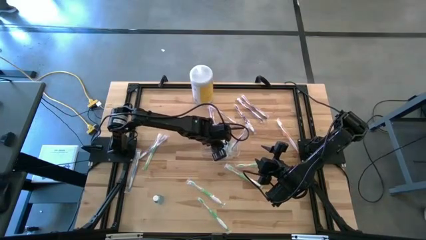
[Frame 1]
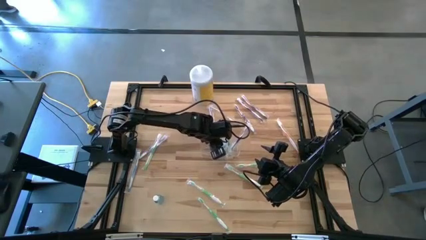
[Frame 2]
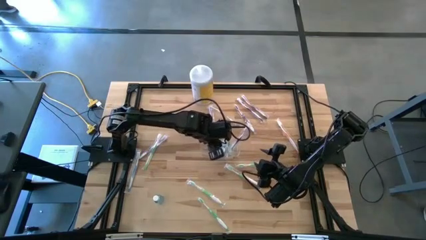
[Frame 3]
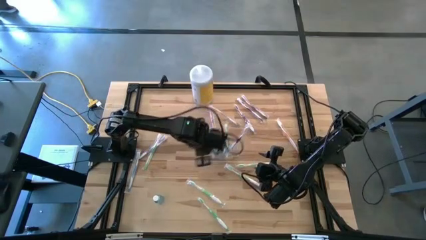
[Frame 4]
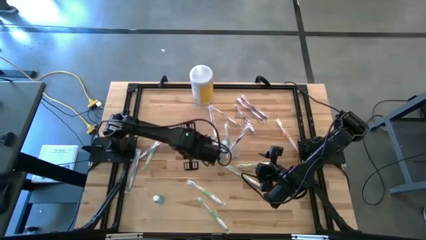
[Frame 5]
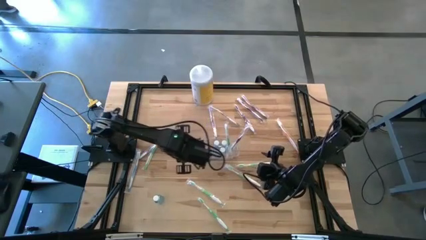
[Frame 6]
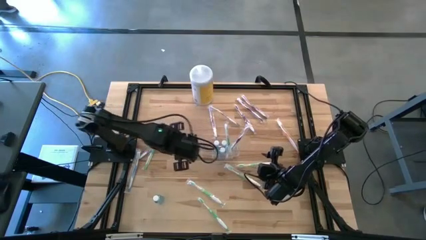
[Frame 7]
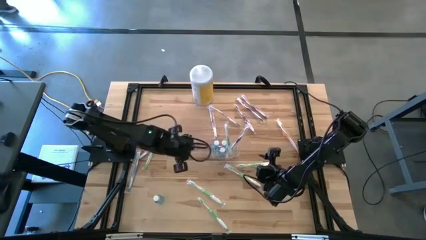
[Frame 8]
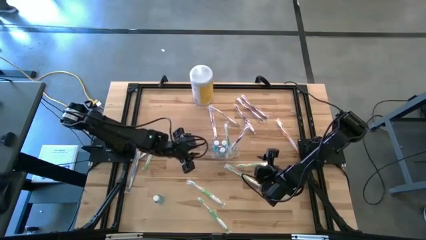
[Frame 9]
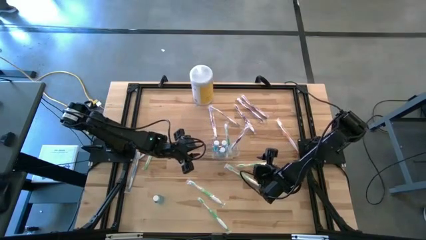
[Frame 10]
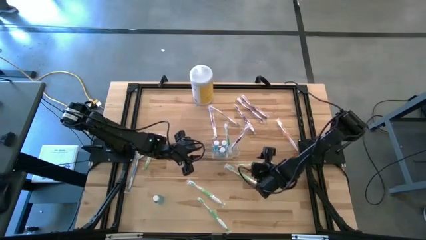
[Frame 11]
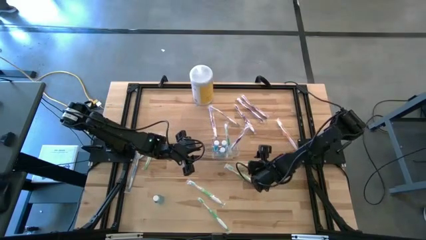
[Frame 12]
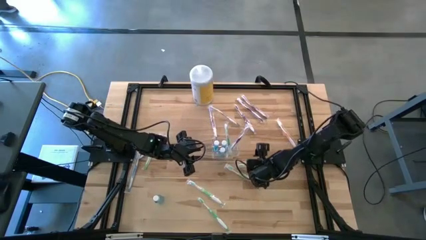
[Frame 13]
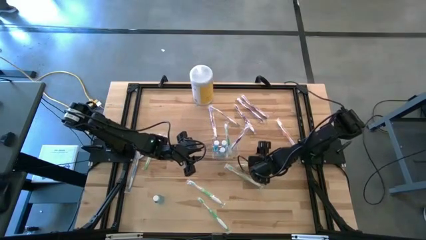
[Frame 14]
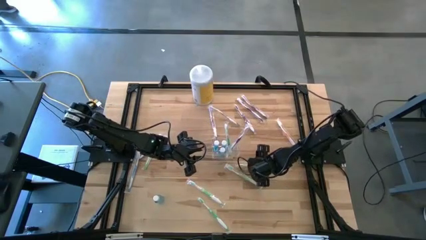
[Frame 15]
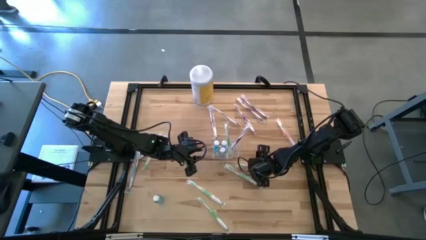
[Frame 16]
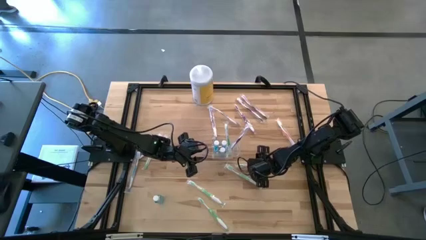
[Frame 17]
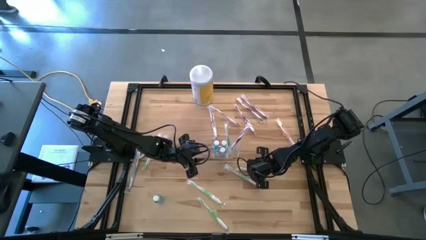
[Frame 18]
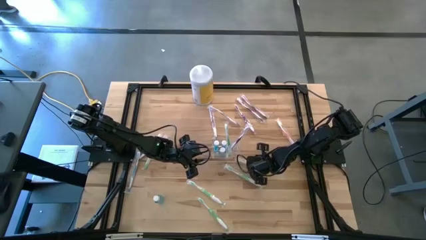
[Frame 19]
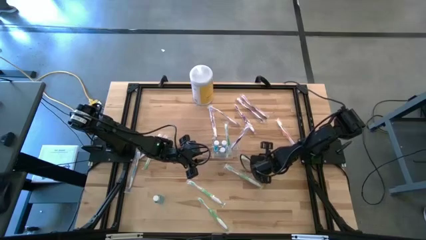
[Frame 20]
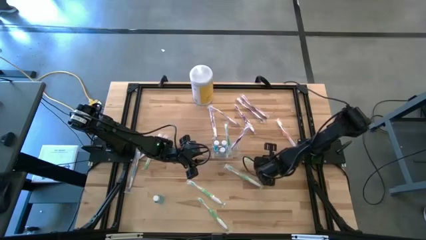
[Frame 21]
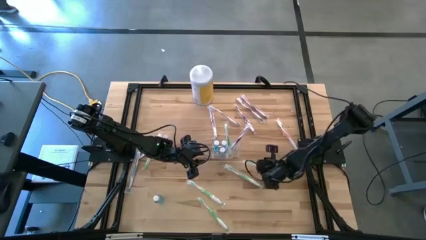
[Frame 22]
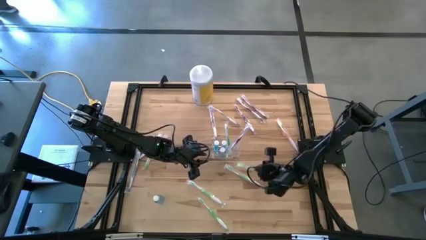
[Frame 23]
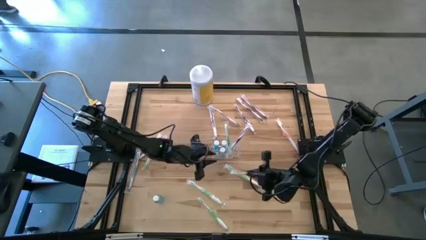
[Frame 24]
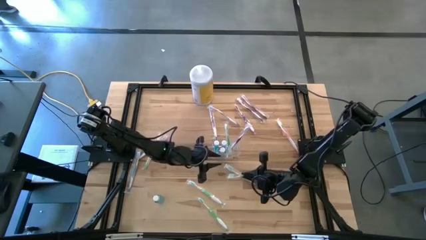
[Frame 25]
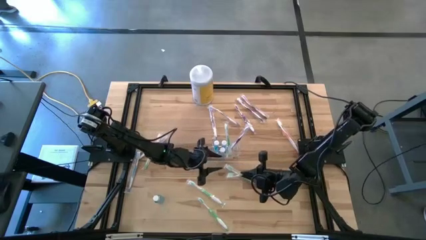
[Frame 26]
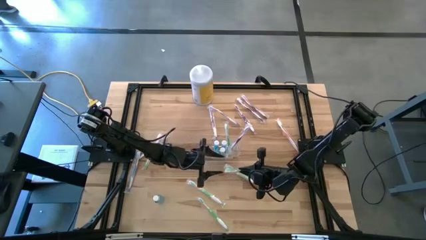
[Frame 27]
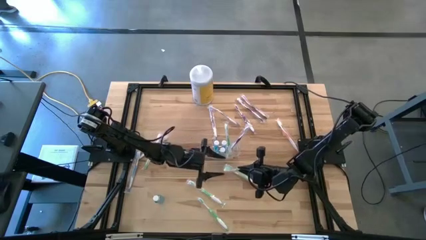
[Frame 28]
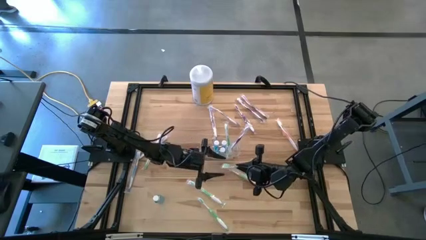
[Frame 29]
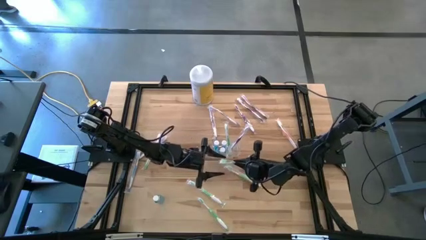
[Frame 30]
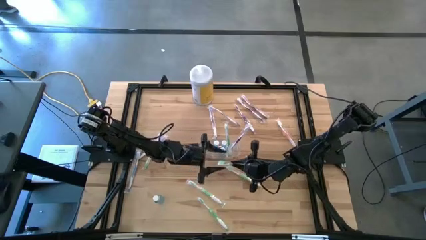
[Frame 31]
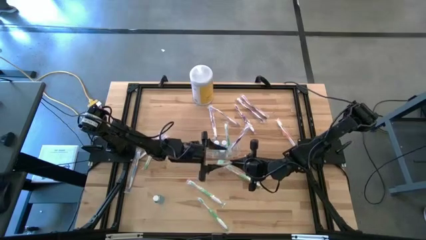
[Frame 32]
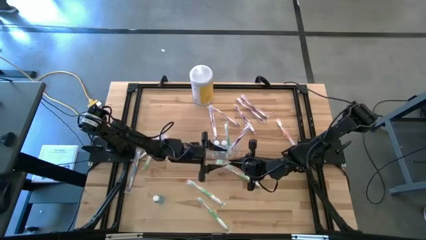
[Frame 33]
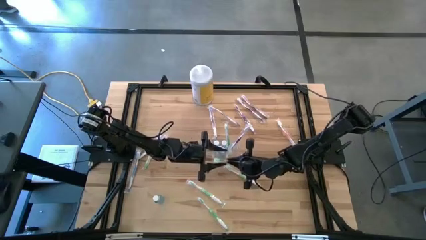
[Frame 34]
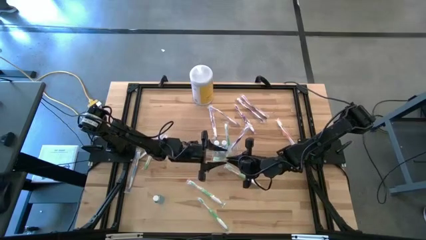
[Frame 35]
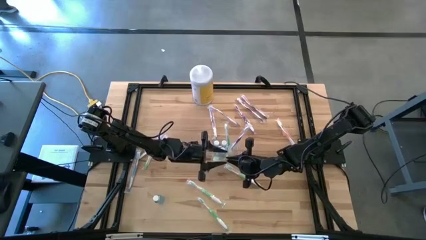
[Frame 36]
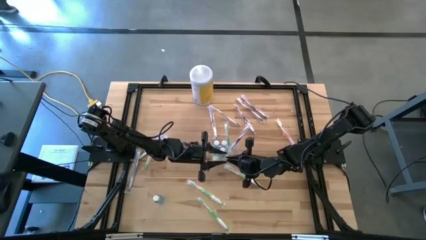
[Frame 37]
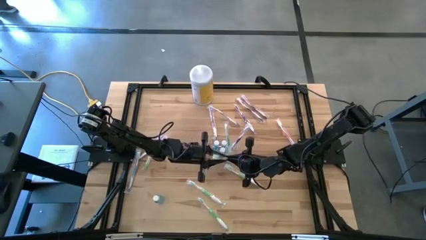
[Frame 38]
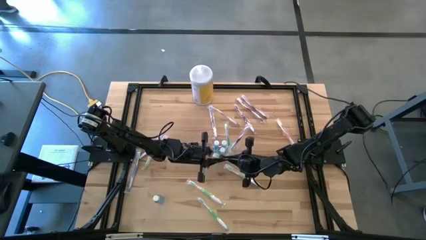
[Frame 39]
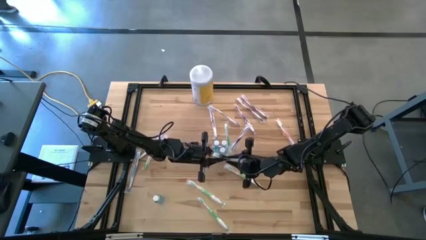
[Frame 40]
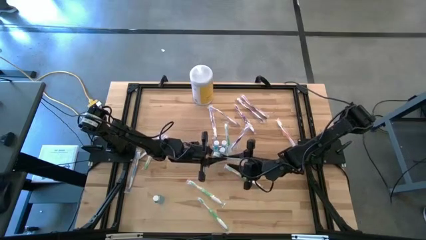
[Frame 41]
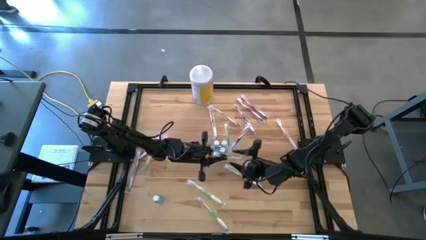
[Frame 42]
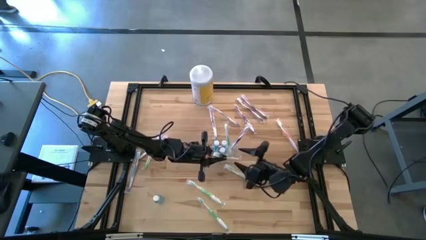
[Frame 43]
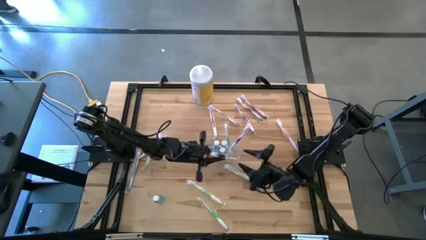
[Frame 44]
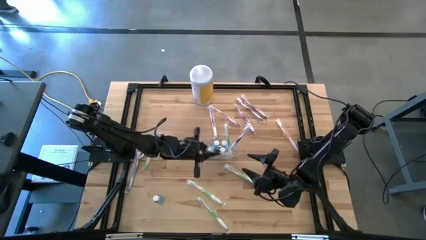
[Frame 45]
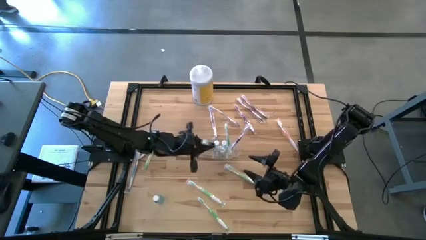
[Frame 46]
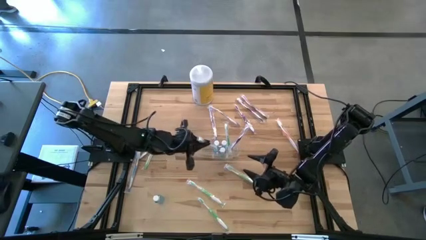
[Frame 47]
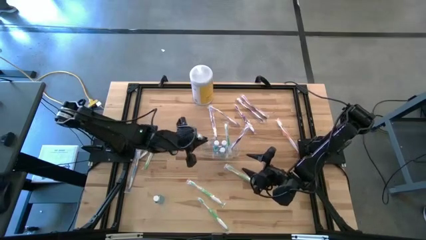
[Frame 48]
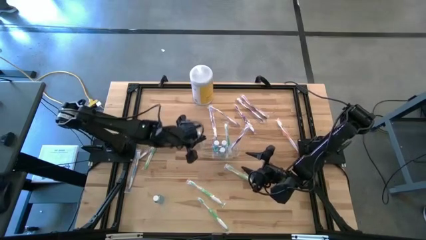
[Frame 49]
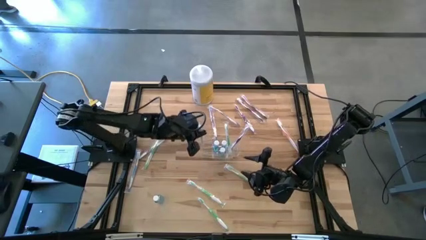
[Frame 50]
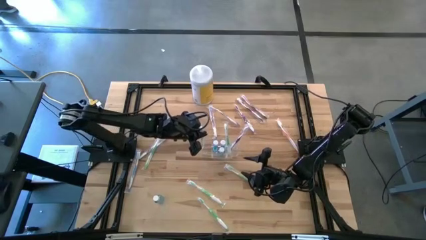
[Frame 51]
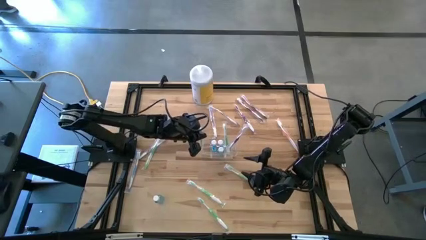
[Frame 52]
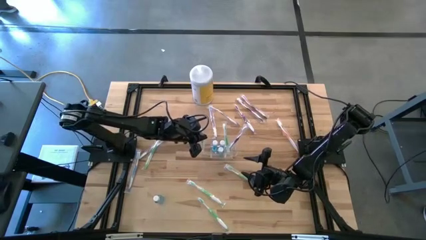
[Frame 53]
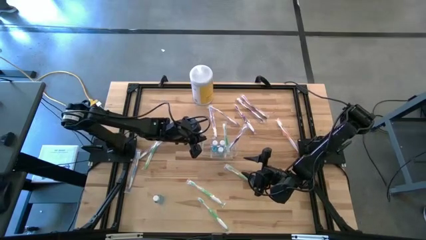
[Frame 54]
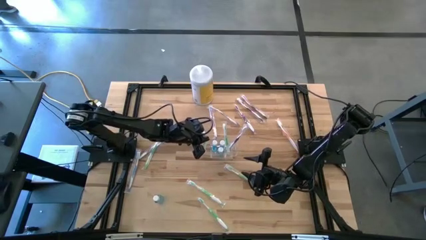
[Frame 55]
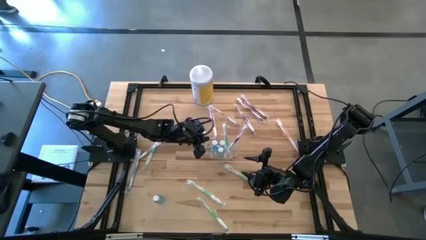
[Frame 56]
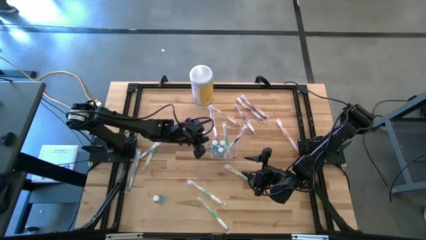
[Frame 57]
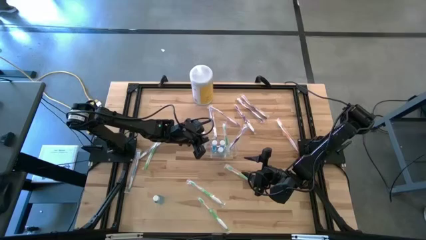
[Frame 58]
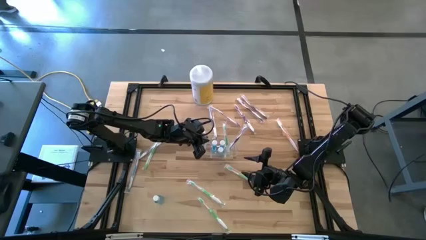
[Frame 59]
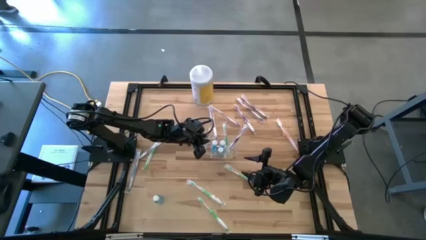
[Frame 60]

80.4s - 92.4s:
Task: Pick & Place toothbrushing station
Put the green toothbrush into the transparent organizer

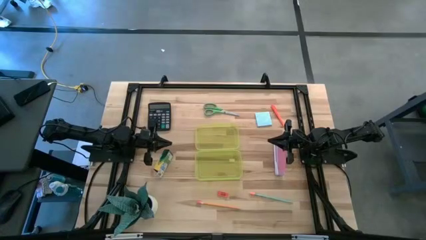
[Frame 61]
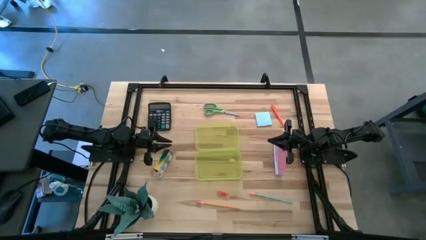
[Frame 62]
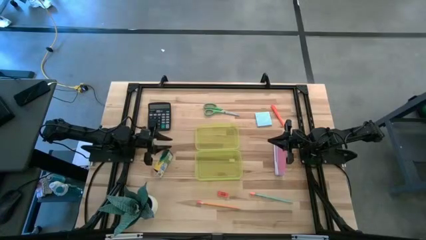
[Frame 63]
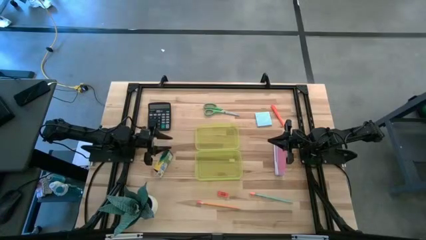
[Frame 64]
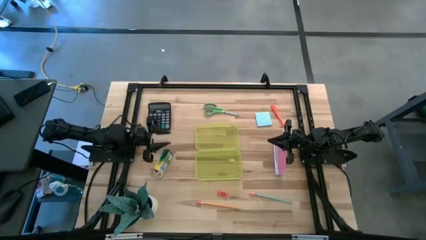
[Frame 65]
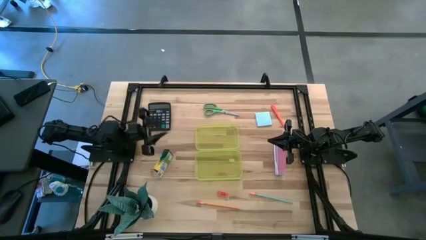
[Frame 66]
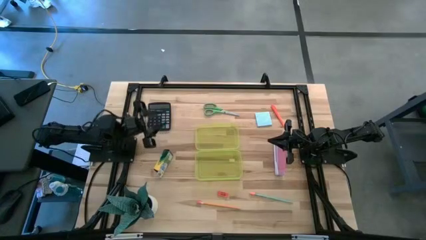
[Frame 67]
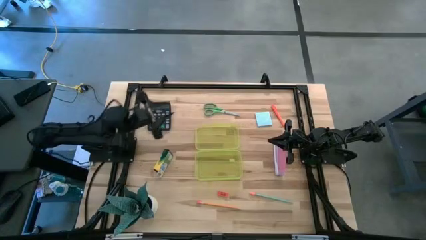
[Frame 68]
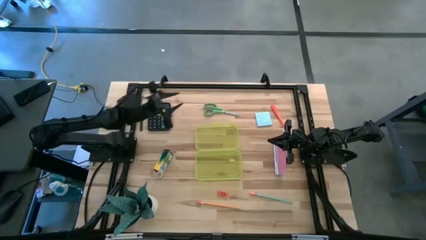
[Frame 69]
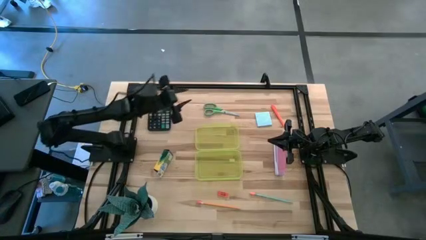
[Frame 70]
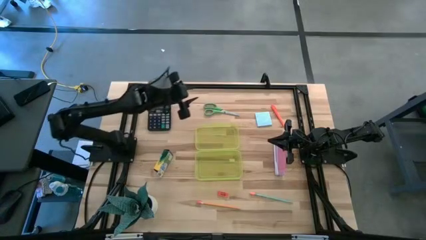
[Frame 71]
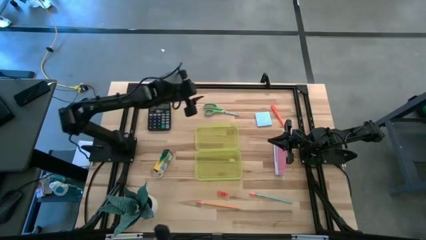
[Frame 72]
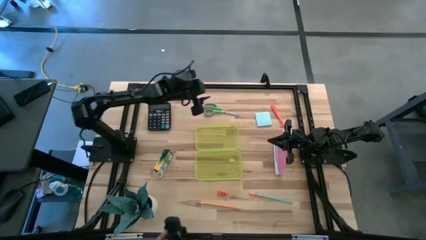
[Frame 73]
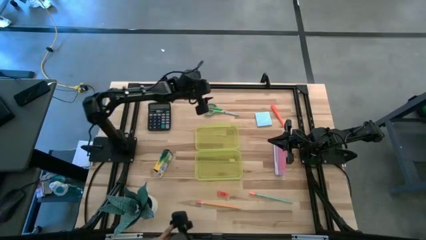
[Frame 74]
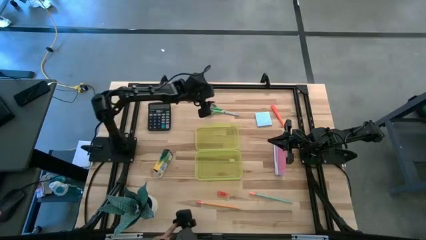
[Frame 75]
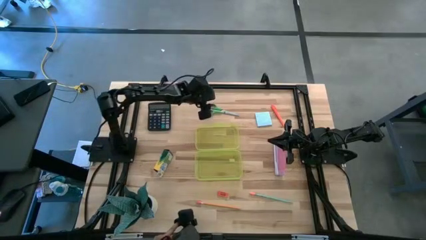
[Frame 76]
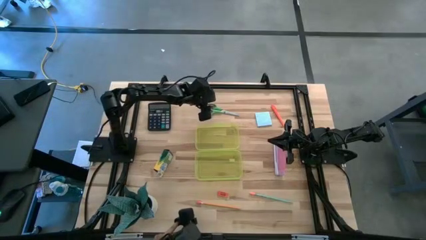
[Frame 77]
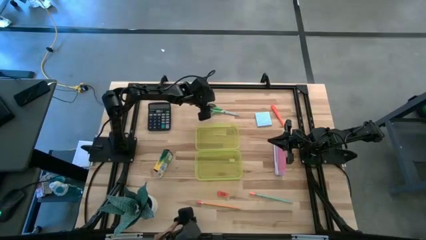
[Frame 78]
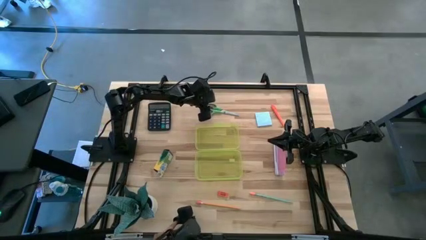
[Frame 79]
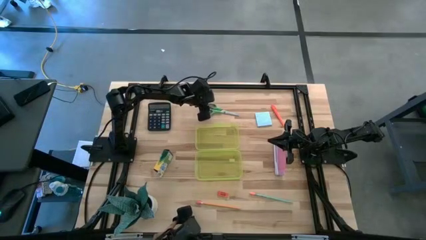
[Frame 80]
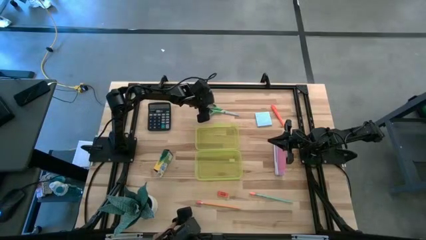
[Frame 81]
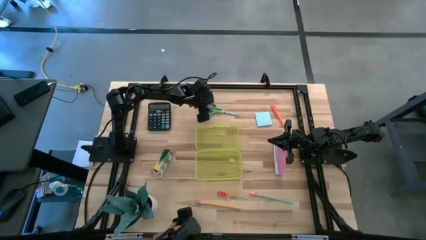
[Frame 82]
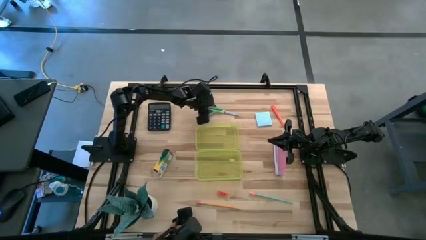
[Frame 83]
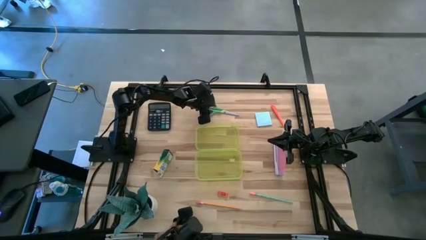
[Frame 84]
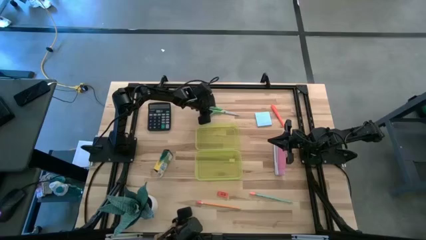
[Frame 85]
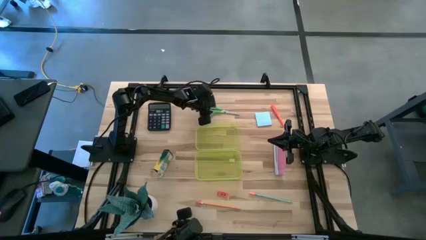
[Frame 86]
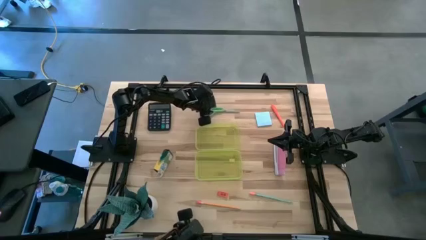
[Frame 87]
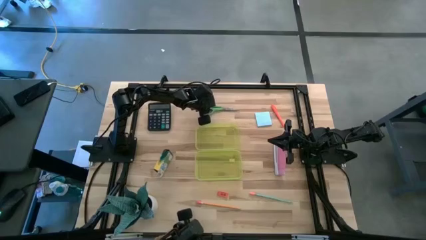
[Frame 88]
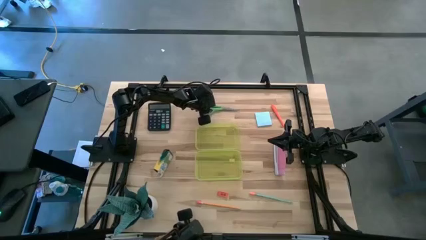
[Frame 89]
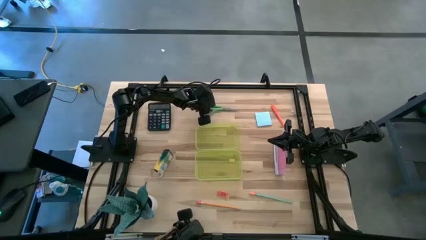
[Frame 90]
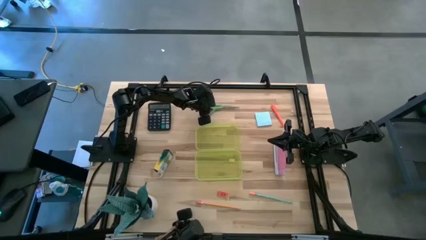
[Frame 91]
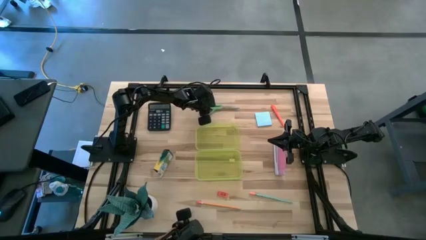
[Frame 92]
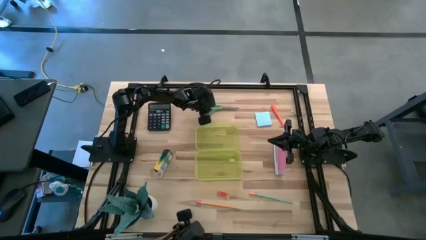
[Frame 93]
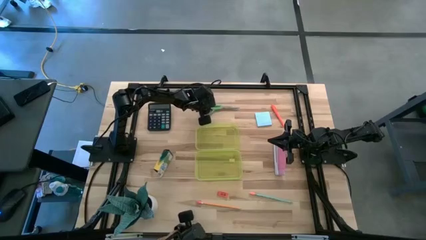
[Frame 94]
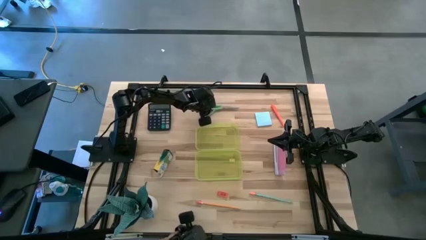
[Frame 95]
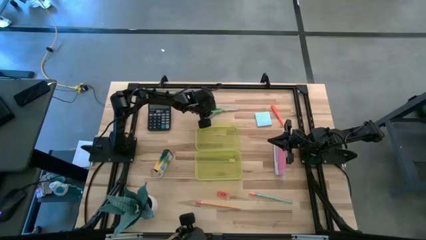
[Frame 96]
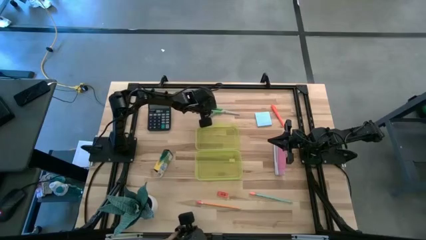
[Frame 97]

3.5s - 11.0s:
Task: Pack school essentials
Put the green scissors into the yellow supply box
